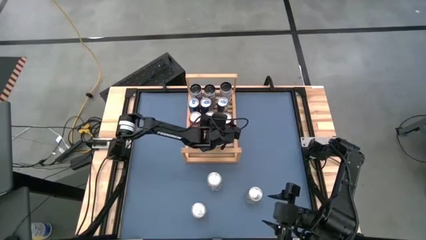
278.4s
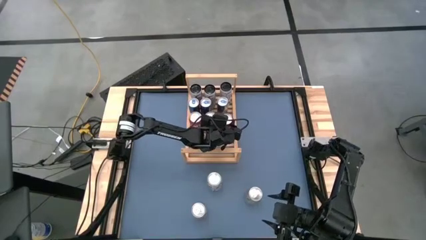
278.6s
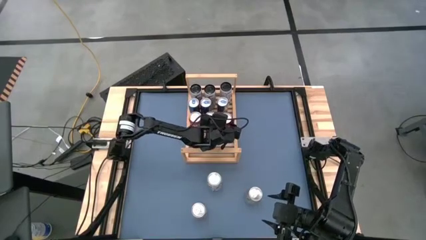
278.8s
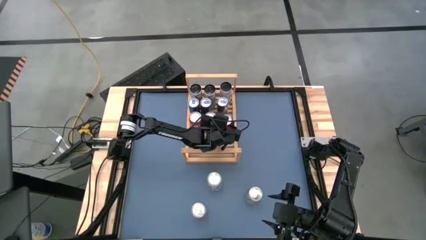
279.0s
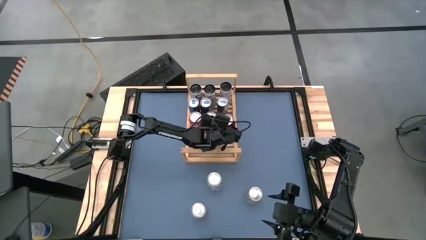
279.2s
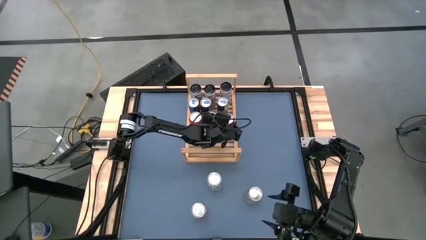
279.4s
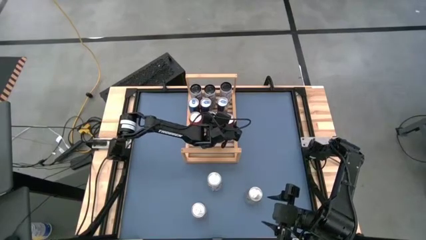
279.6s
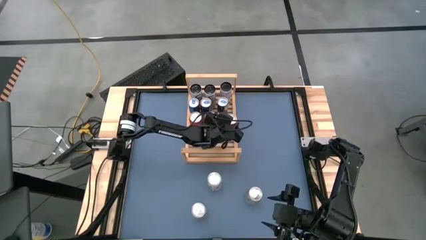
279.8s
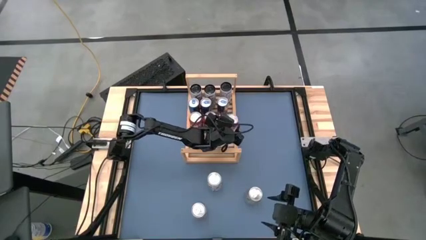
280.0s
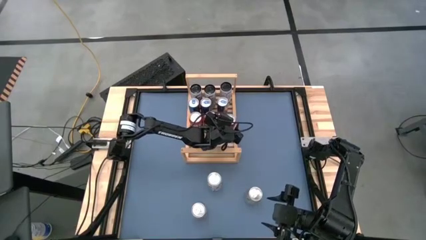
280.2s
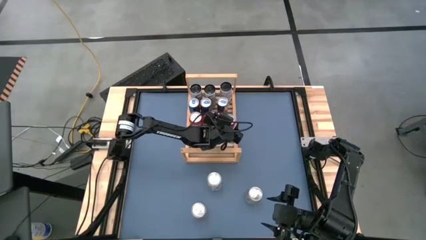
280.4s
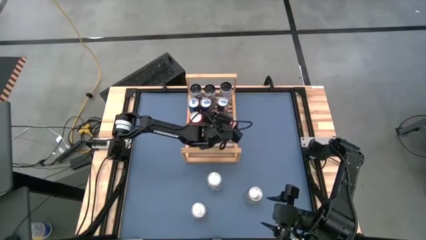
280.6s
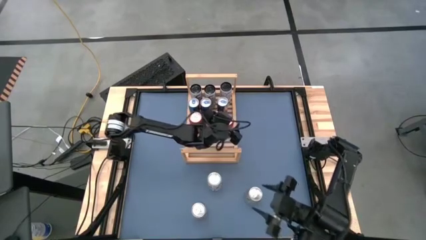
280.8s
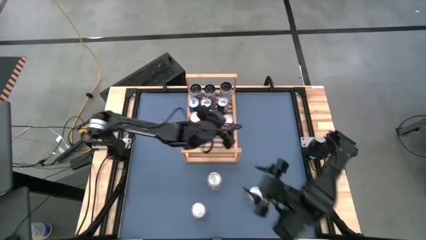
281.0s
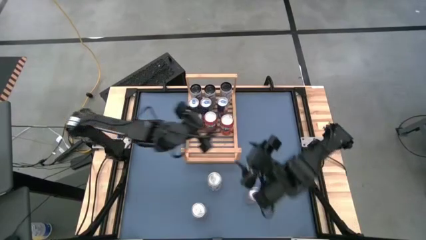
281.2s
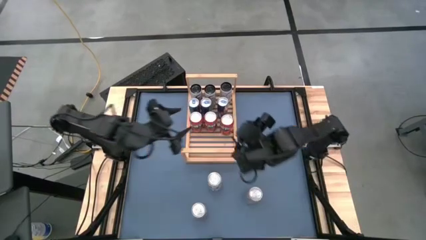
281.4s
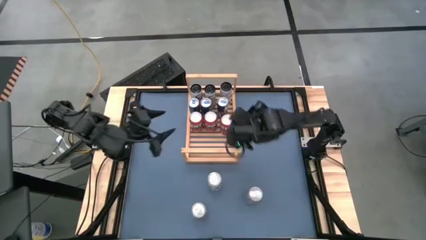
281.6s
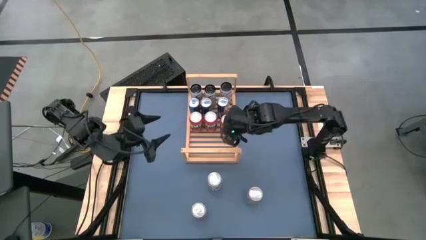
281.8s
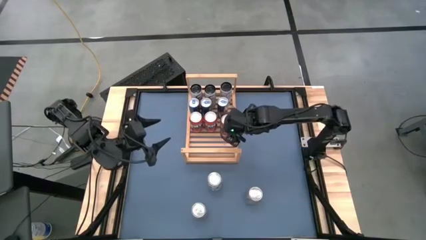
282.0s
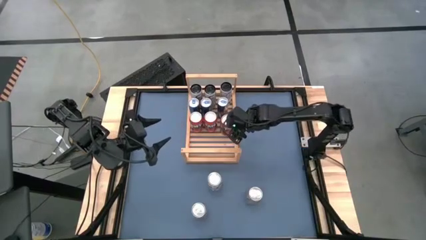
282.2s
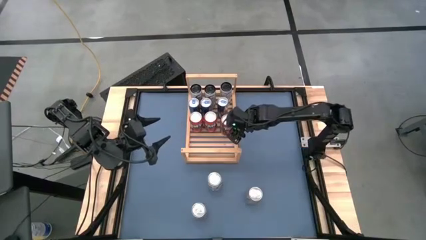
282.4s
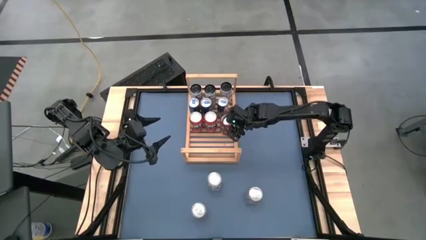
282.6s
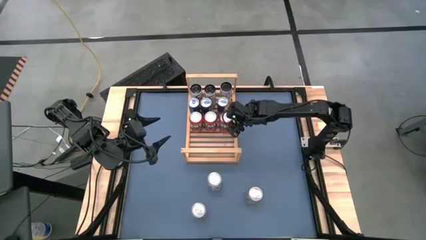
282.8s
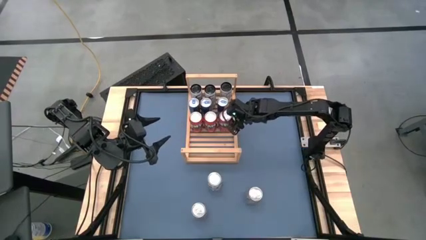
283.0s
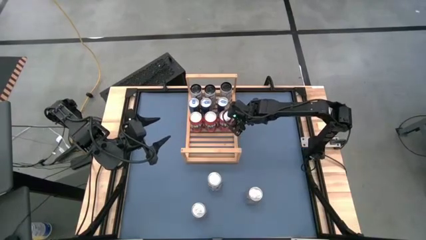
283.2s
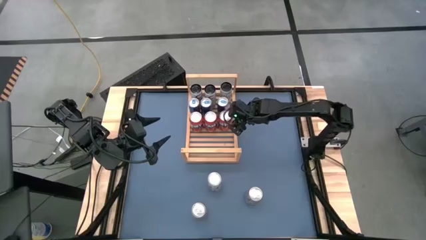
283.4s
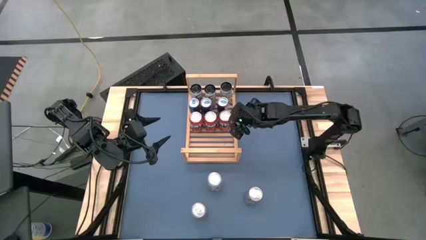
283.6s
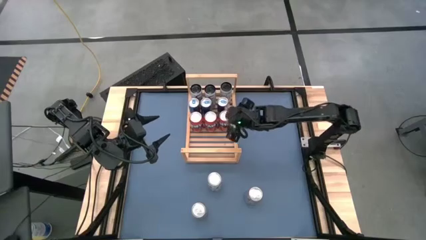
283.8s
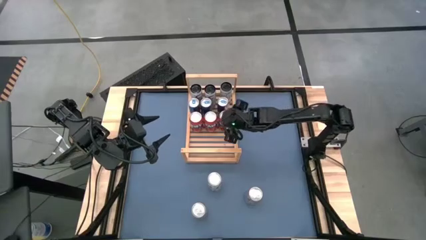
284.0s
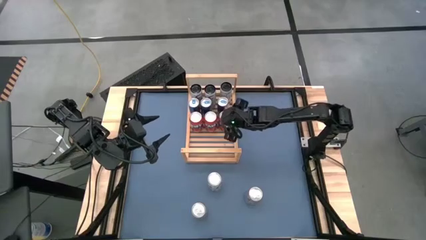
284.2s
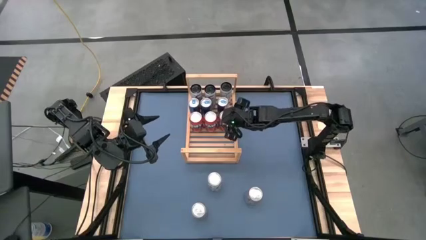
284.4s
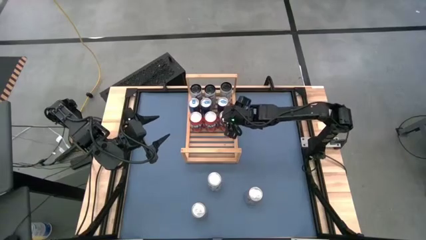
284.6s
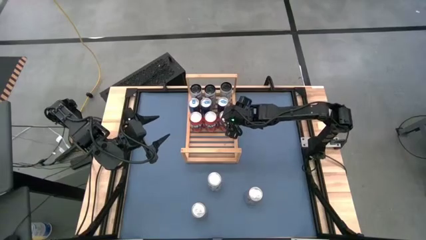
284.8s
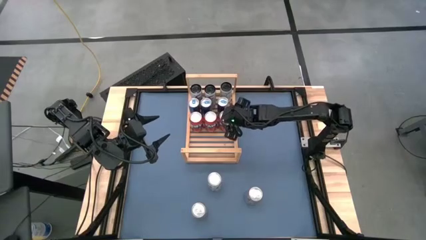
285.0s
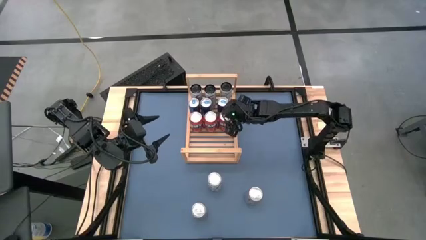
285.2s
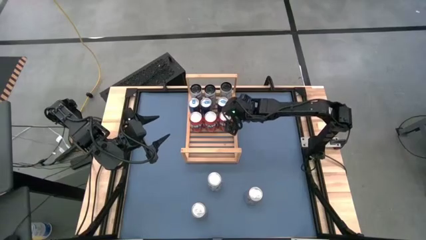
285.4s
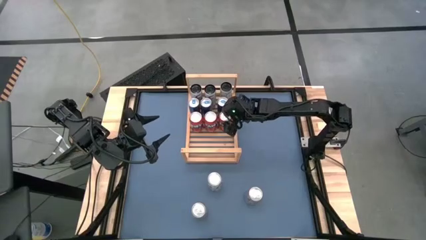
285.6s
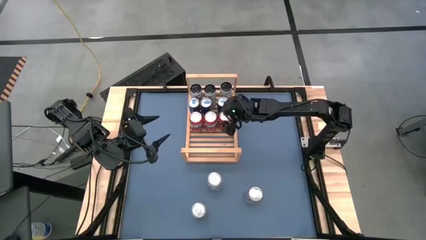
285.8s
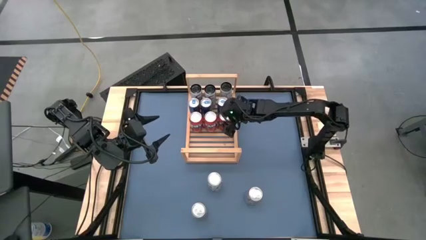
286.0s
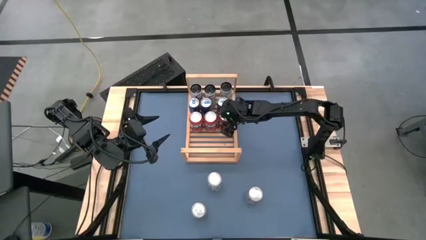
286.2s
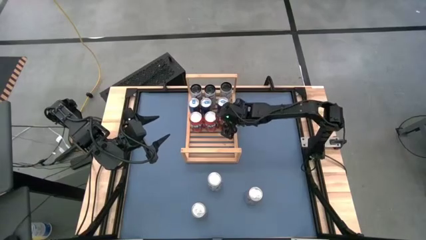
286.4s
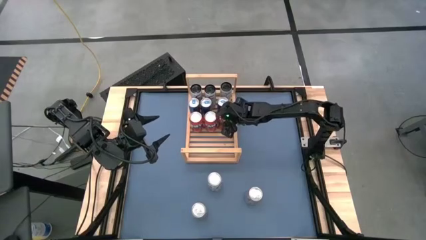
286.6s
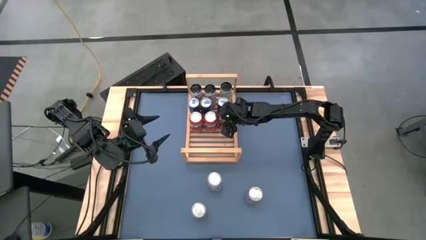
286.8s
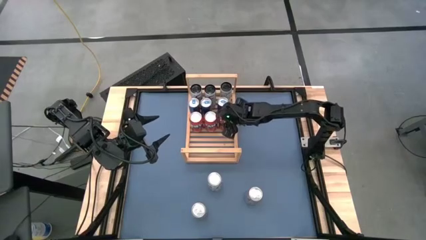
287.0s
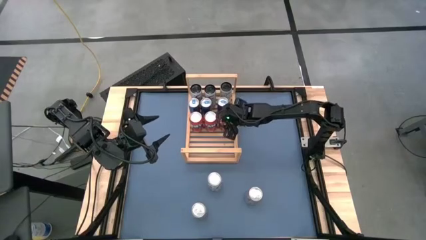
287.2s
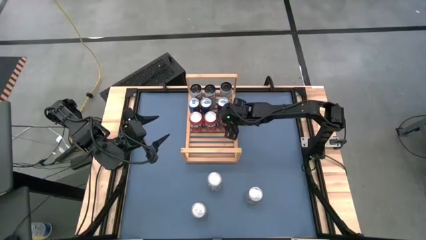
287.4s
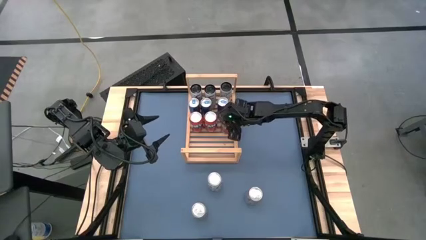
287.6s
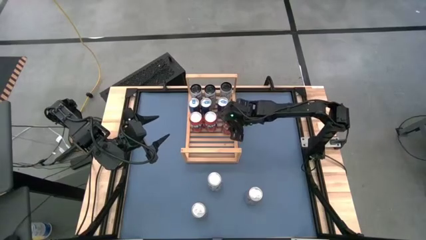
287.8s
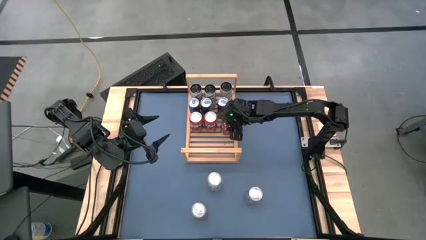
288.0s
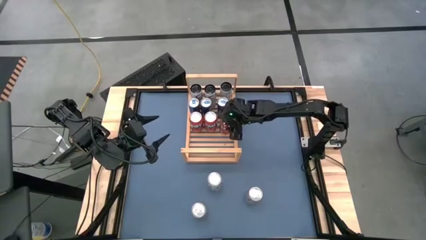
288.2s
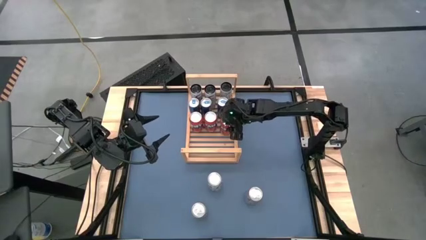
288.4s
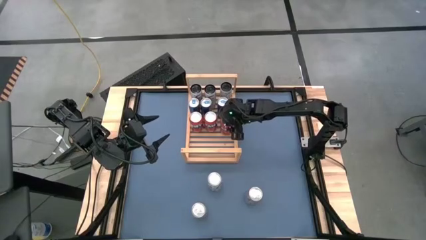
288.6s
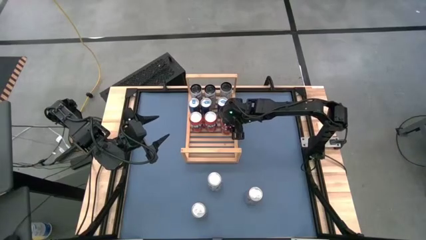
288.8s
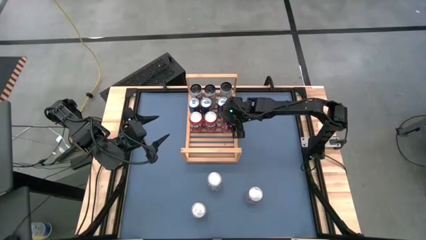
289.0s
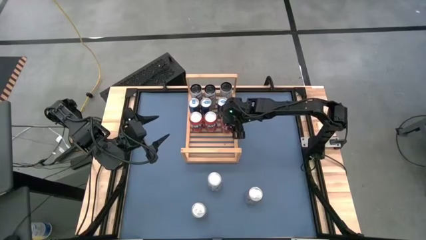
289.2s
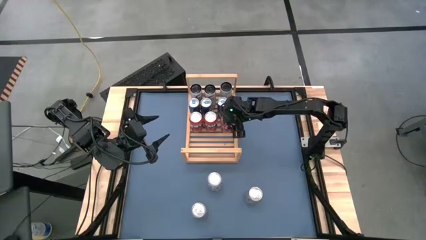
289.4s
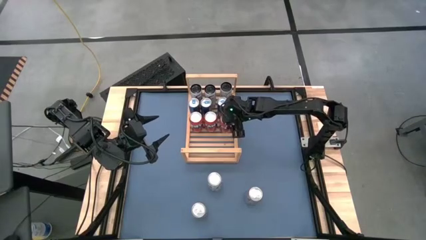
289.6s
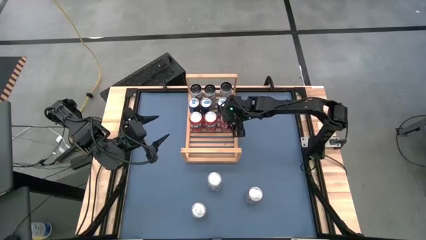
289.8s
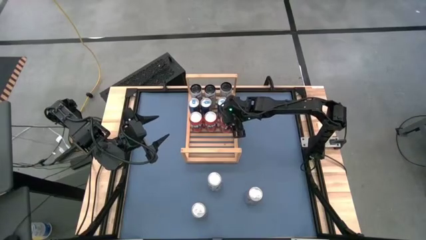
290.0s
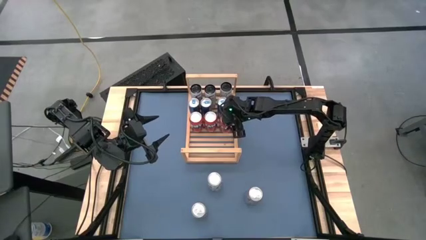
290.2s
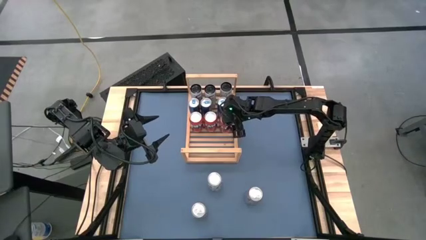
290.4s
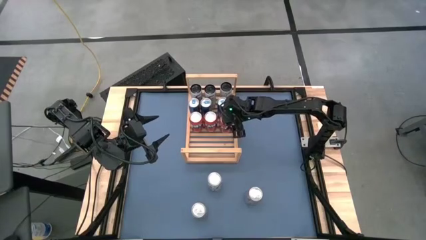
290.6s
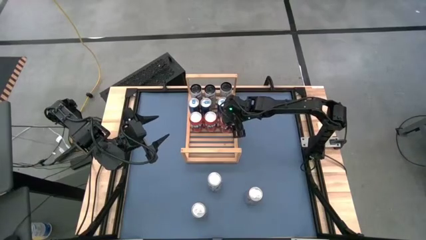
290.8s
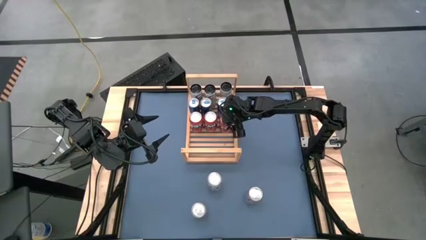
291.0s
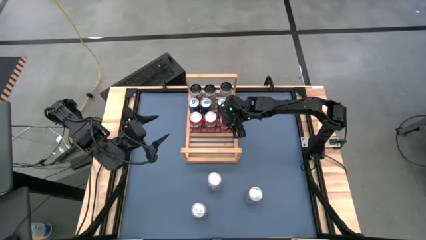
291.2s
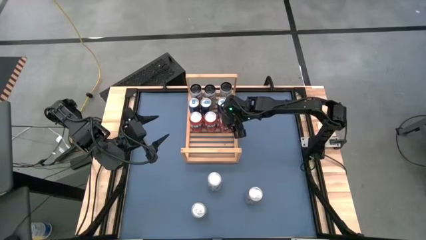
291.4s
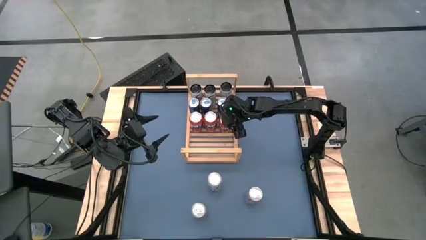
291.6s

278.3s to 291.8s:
Task: Place canned beverage on shelf
Put the orange soda can on the shelf aligned with the other orange soda cans

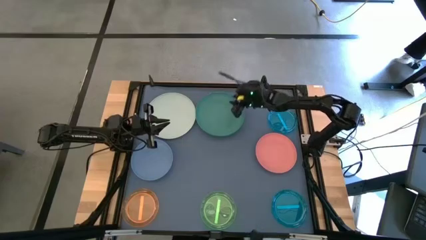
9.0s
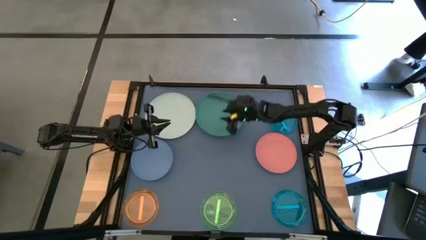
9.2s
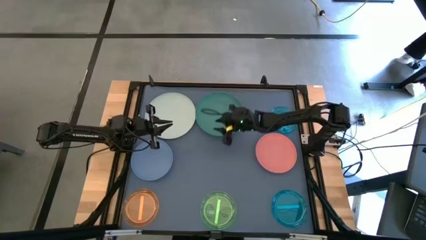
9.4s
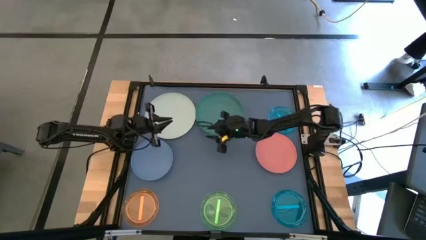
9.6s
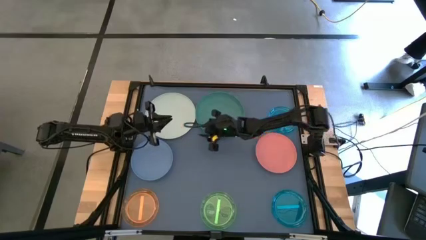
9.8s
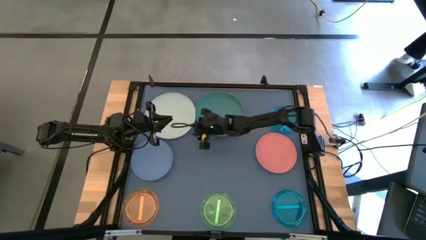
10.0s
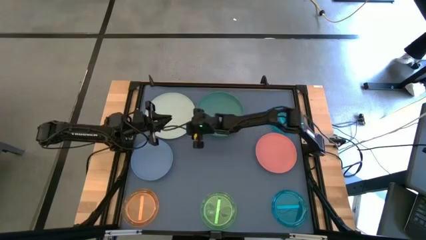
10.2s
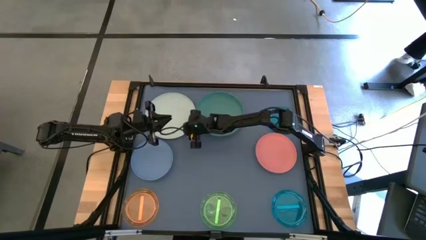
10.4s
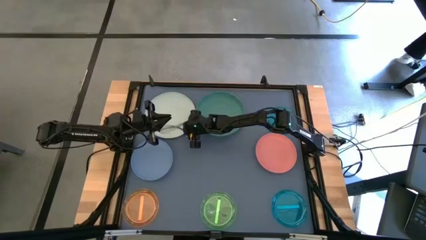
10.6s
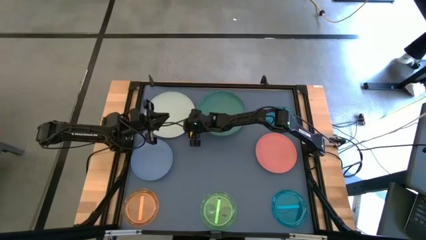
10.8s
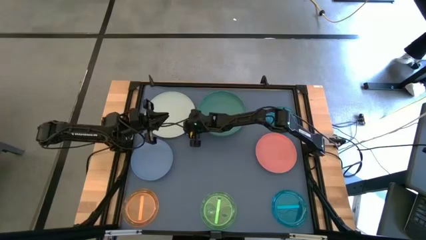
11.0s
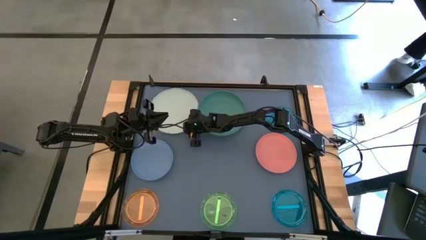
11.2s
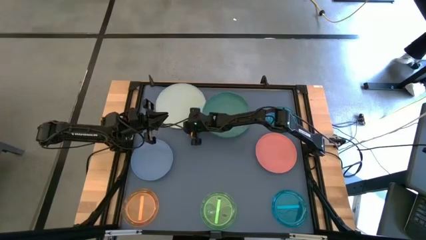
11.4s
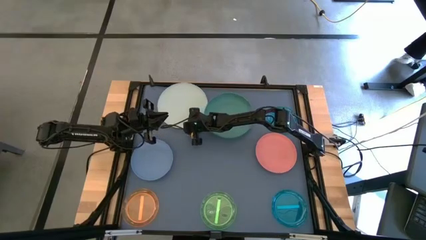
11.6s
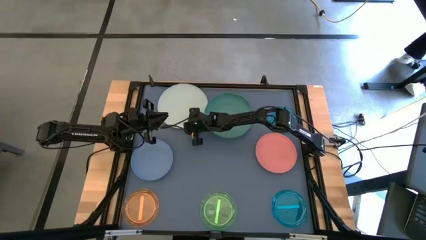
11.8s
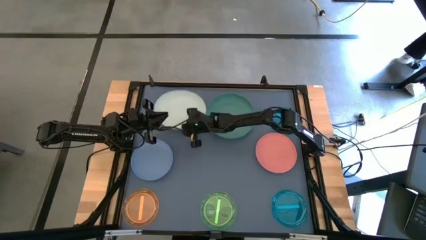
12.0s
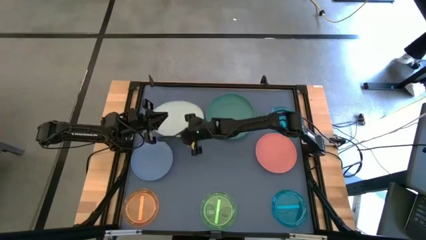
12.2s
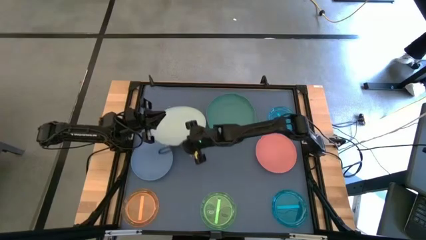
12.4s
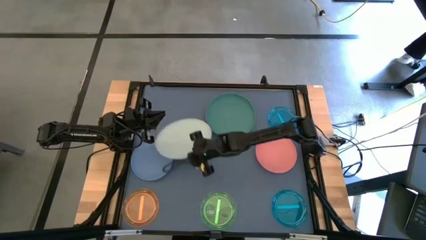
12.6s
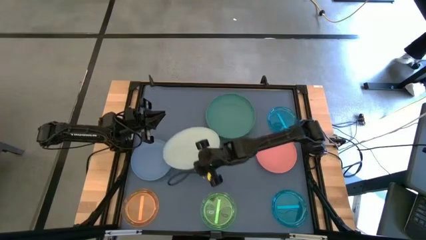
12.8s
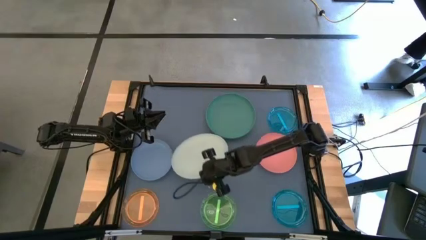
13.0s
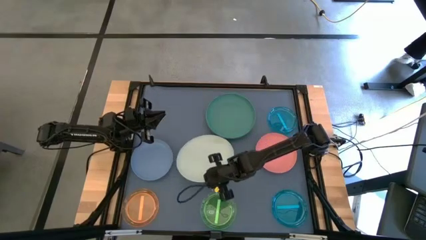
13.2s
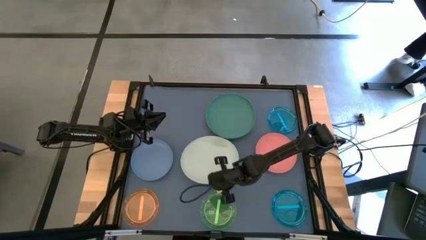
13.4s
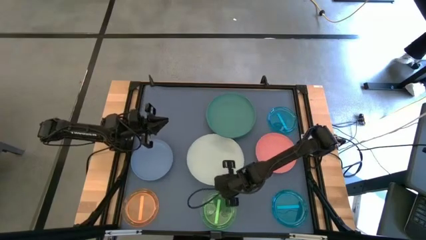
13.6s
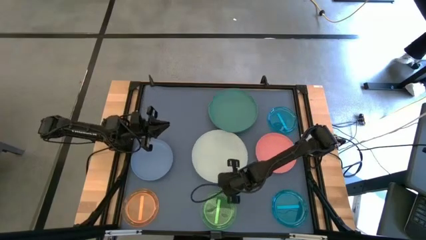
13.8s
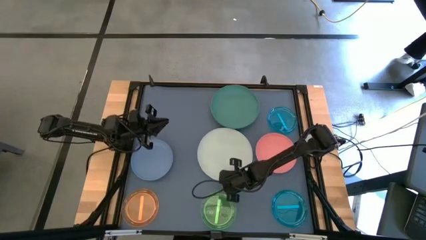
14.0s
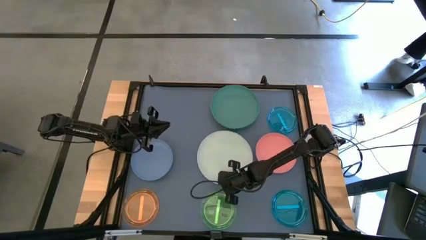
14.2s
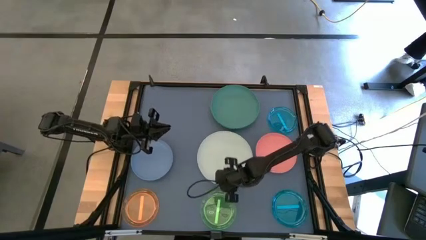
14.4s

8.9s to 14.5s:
Task: Stack plastic plates
Move the white plate to center of the table
